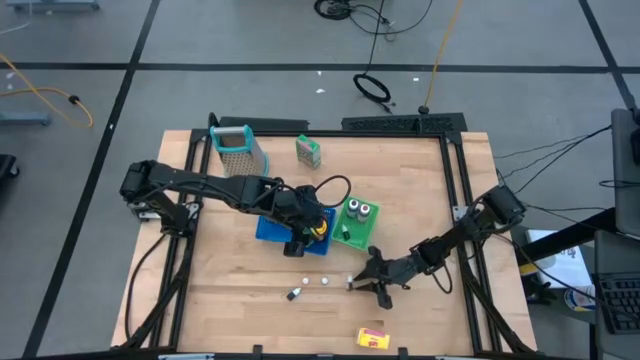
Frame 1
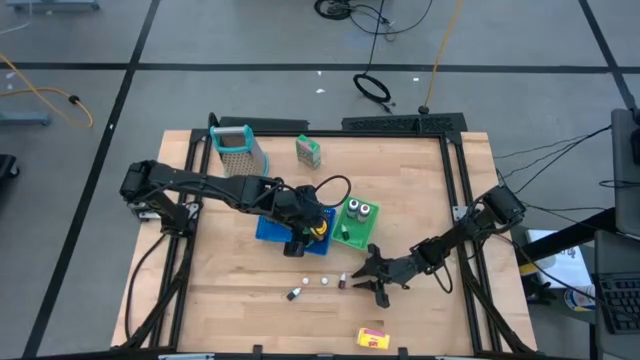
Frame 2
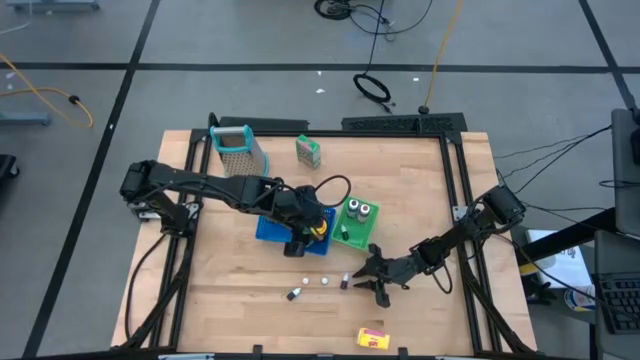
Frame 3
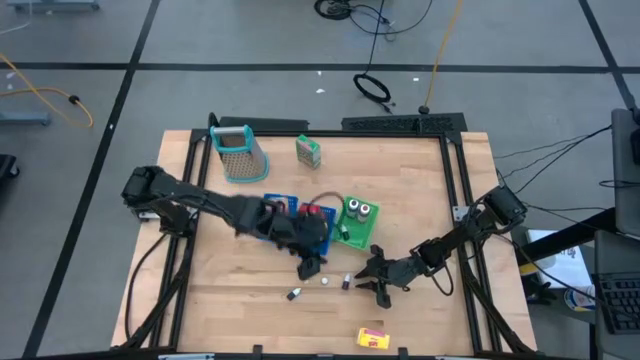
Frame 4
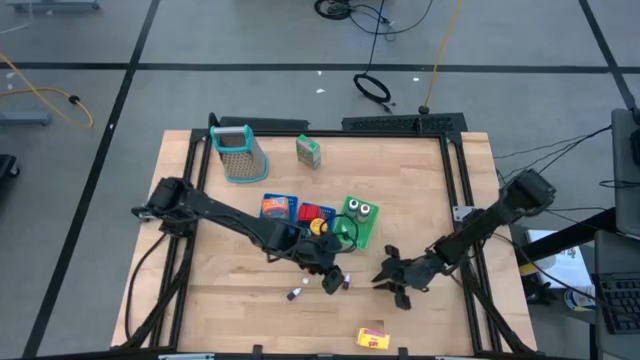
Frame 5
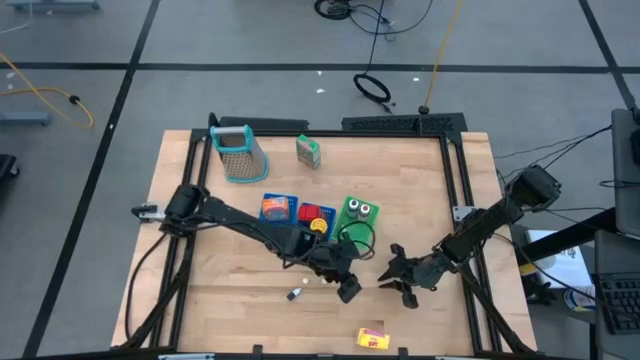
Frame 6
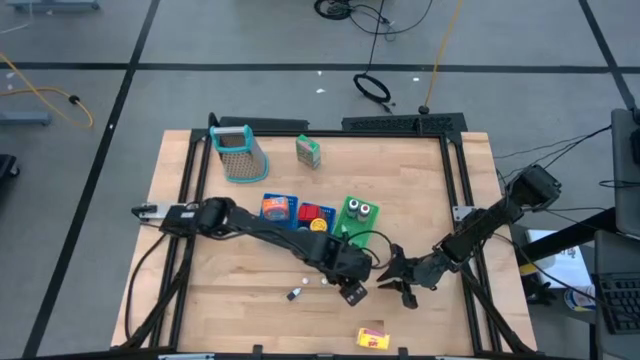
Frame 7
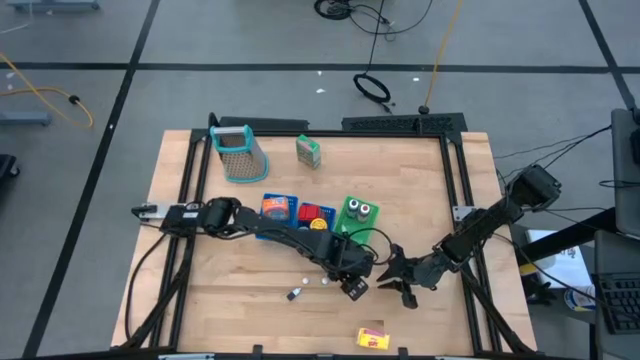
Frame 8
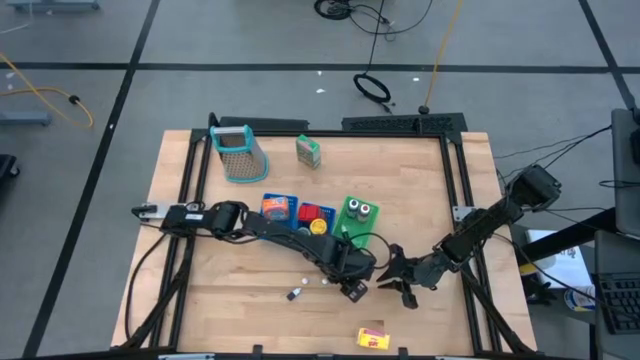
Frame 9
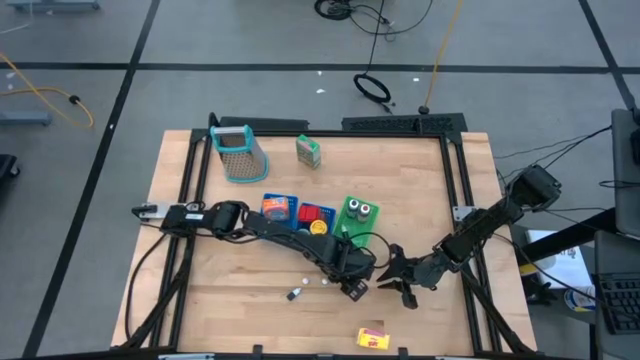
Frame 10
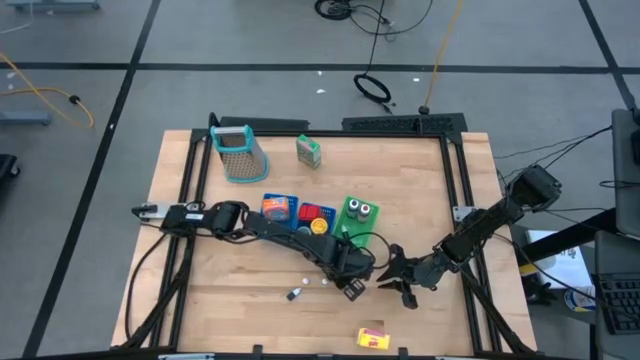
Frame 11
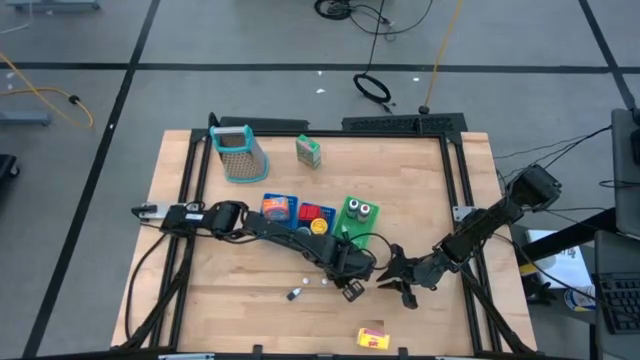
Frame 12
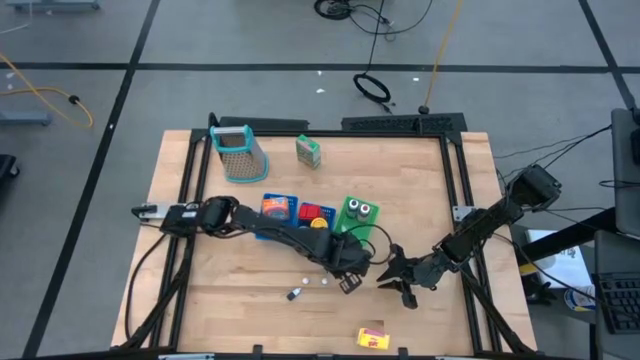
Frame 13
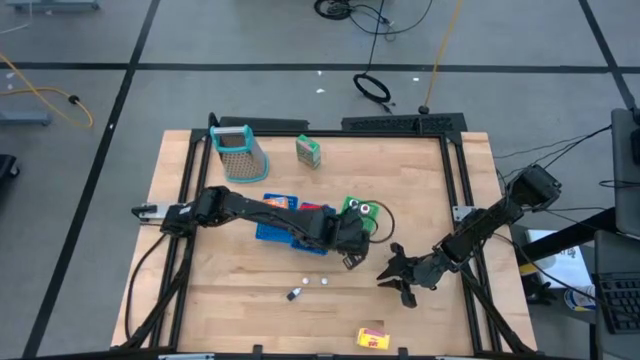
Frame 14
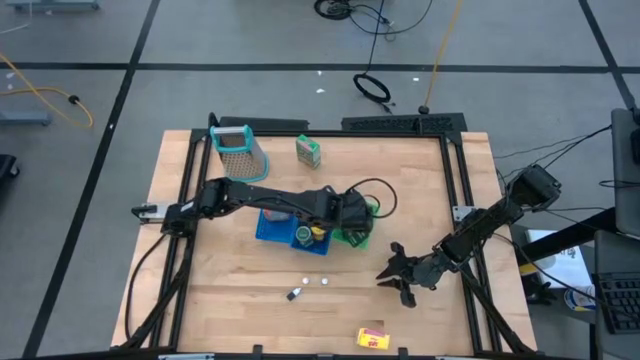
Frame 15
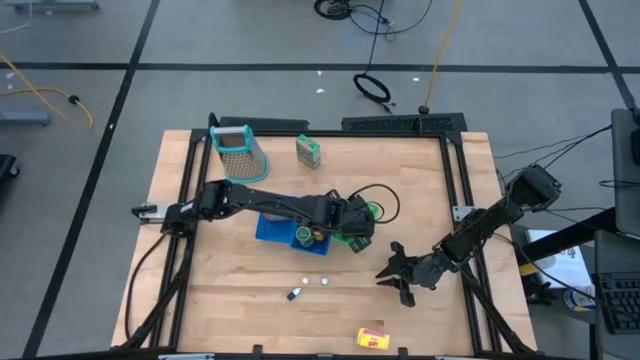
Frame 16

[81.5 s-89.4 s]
Task: Pick & Place Kitchen Items
Put the red food color into the green bin

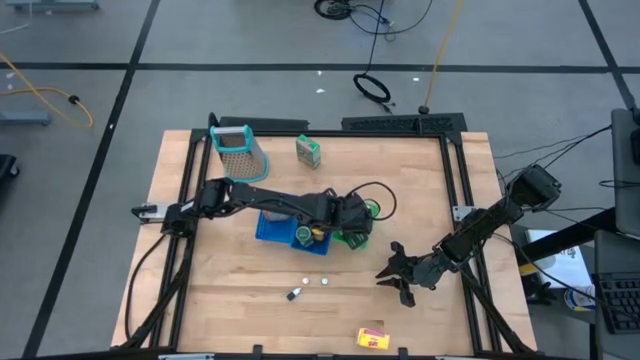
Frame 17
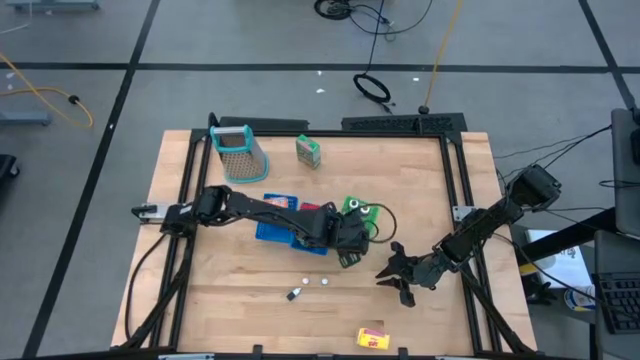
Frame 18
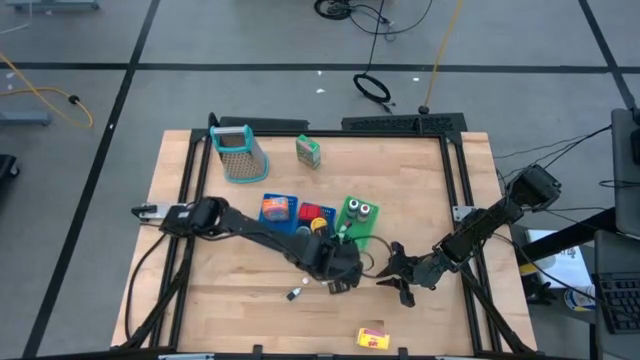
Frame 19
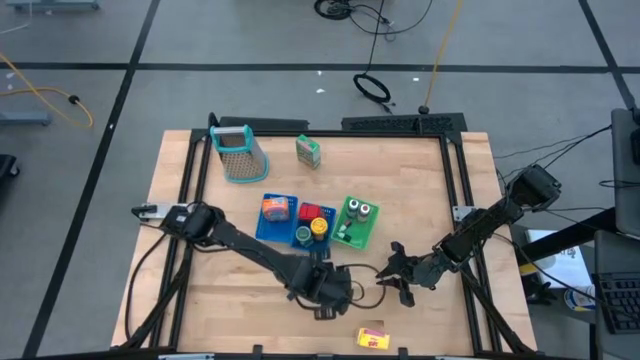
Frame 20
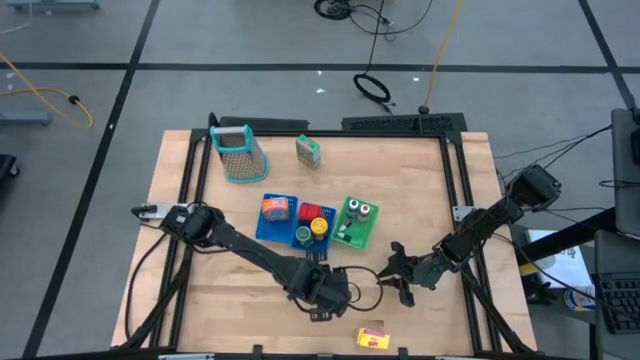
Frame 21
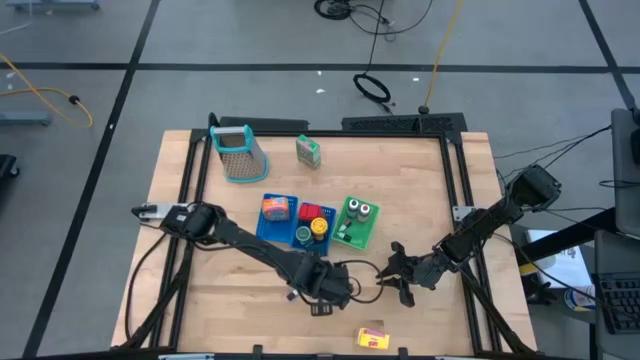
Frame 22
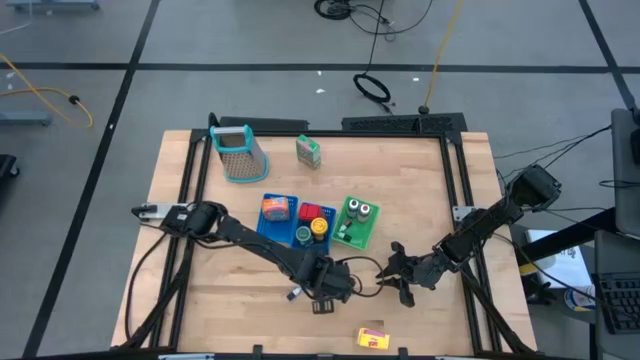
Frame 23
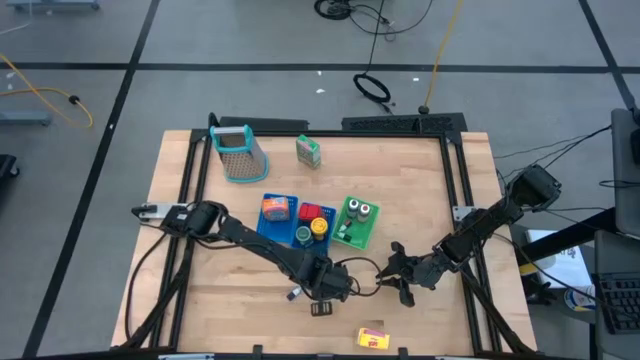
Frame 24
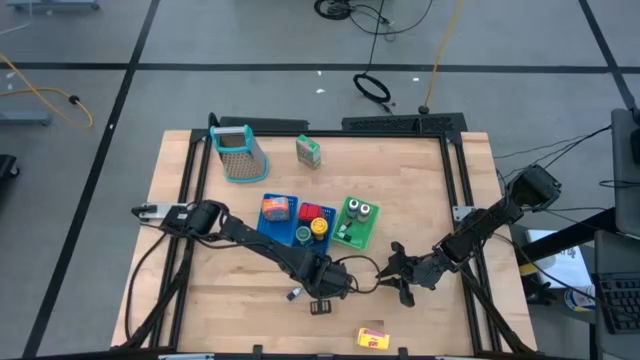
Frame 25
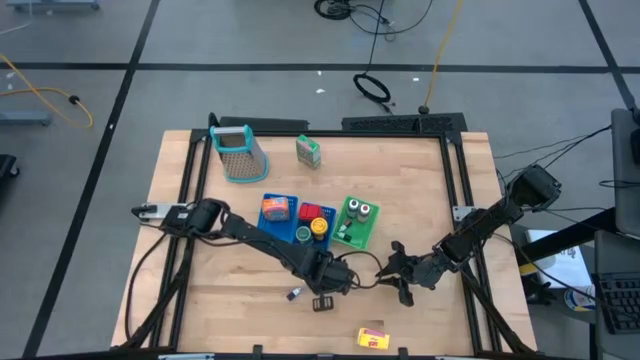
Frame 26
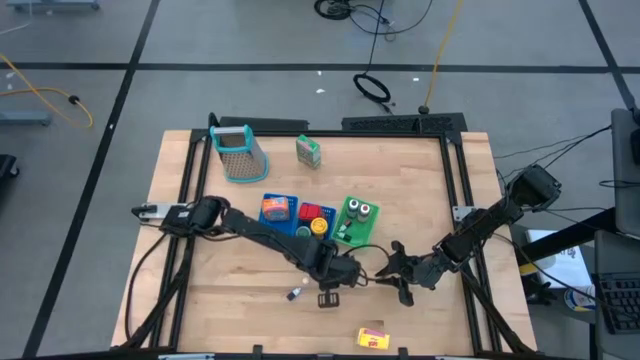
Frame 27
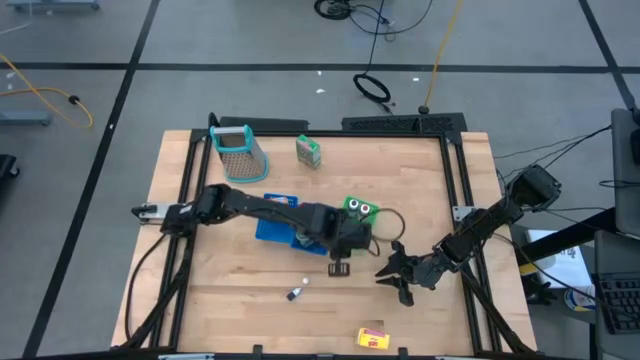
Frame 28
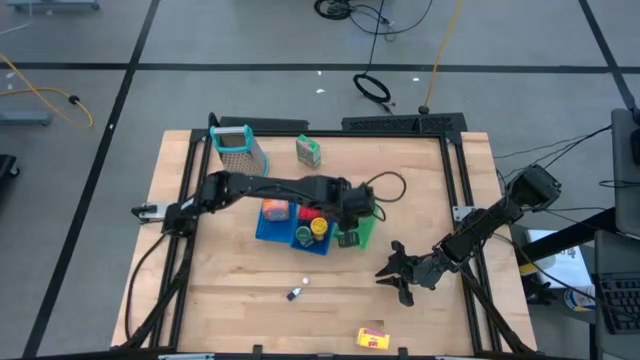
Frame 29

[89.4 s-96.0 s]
Put the green food color into the green bin

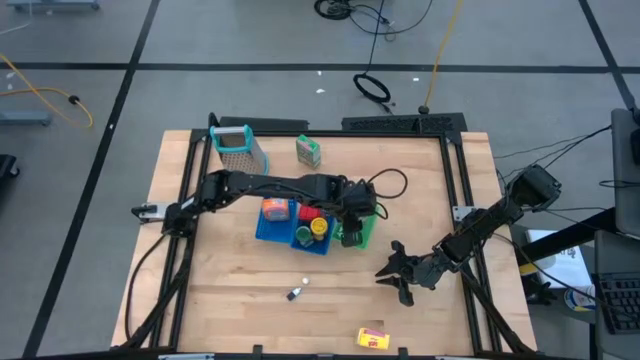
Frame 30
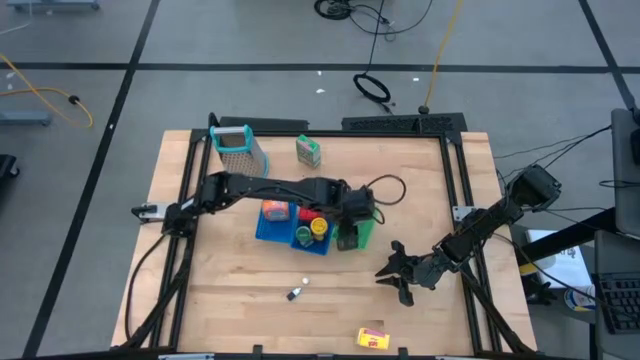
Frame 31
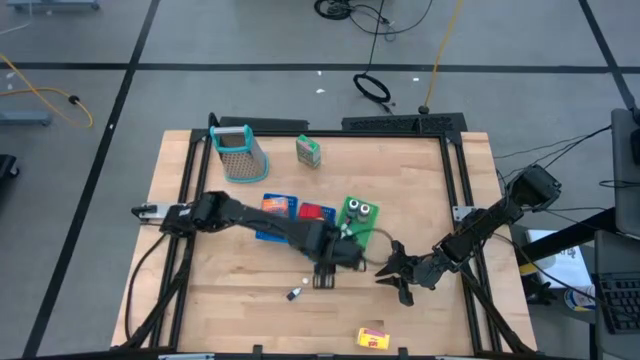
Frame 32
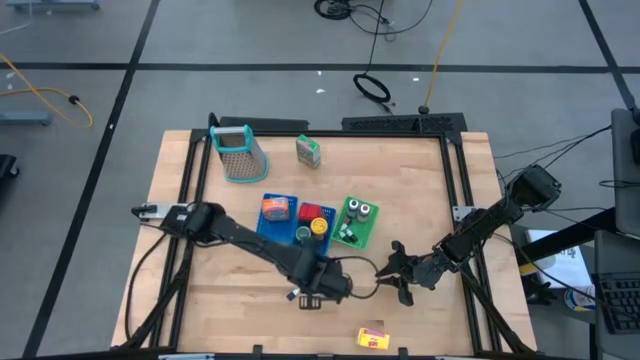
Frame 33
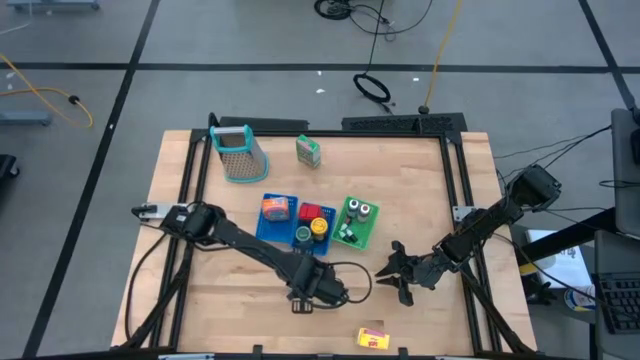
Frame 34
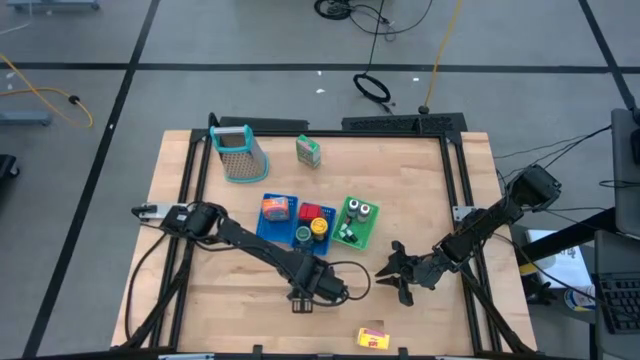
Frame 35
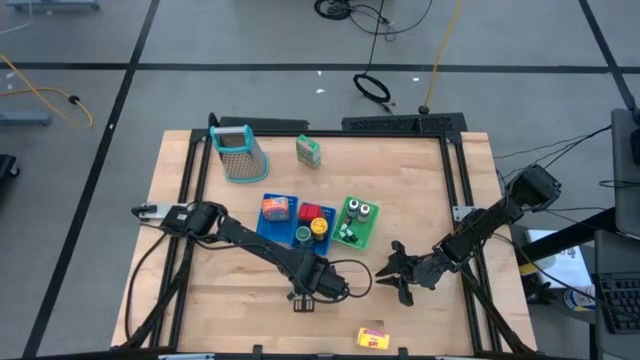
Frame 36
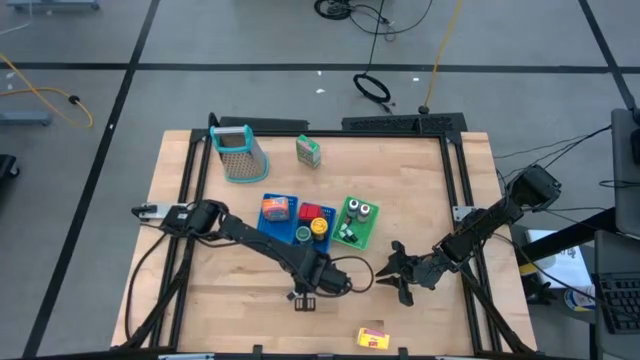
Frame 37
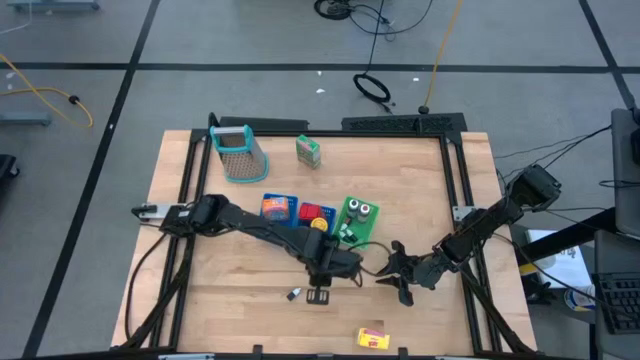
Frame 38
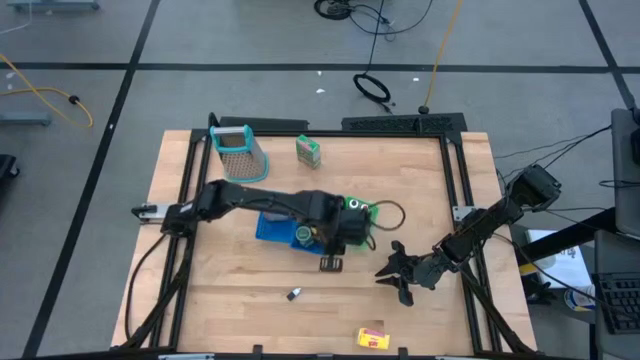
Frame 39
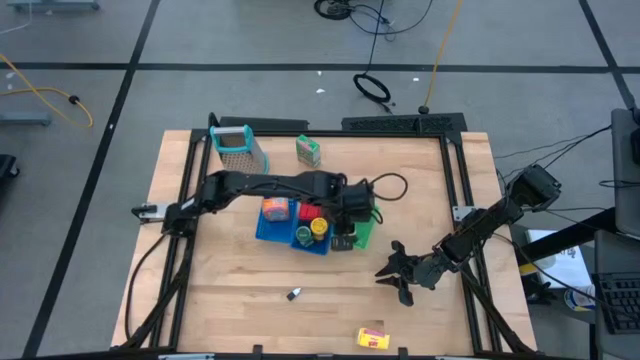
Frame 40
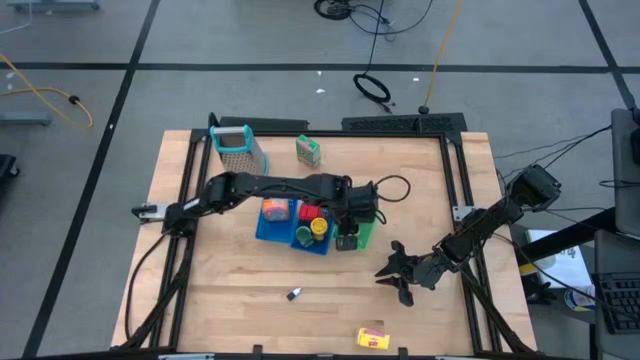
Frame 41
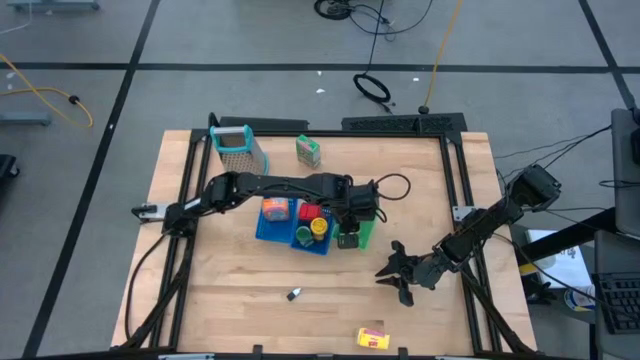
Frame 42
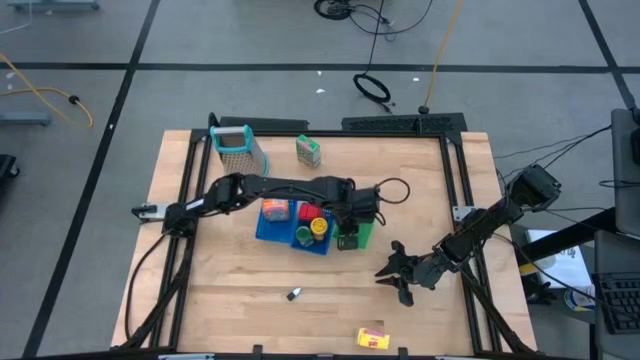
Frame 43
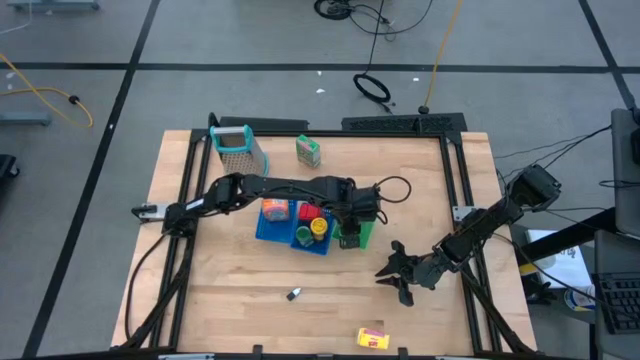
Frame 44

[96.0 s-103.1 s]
Put the yellow food color into the green bin
